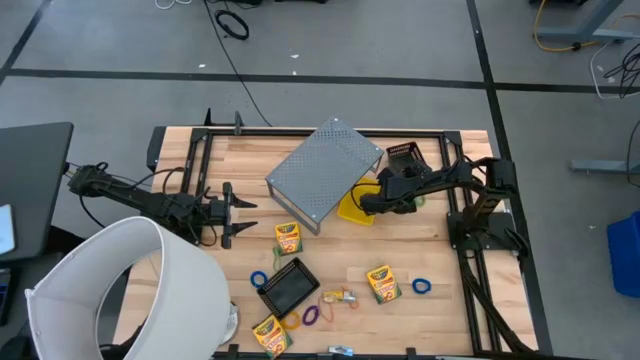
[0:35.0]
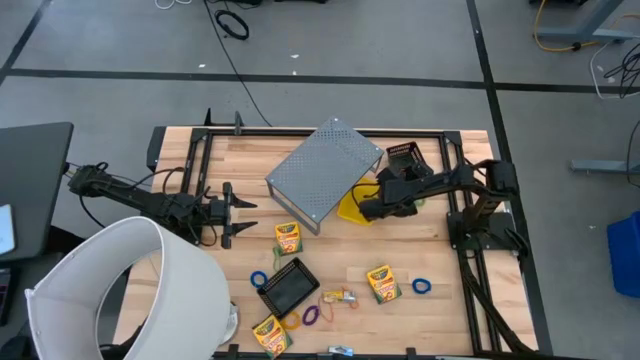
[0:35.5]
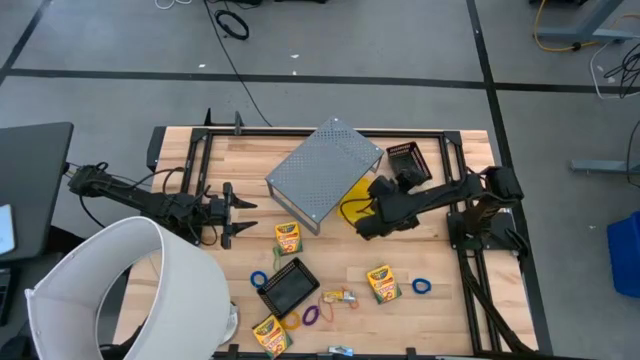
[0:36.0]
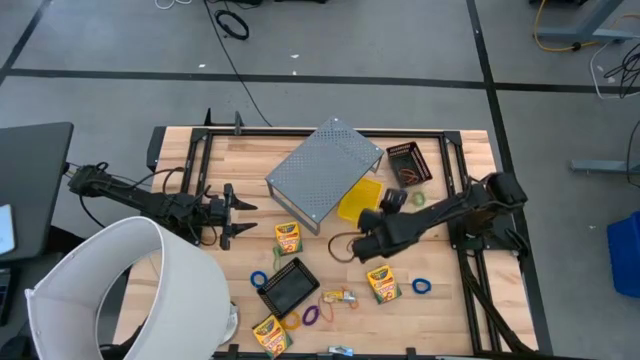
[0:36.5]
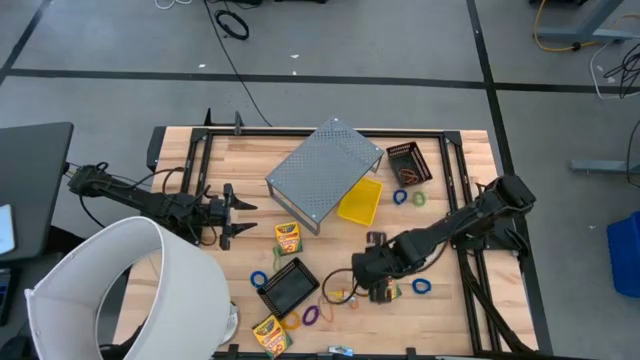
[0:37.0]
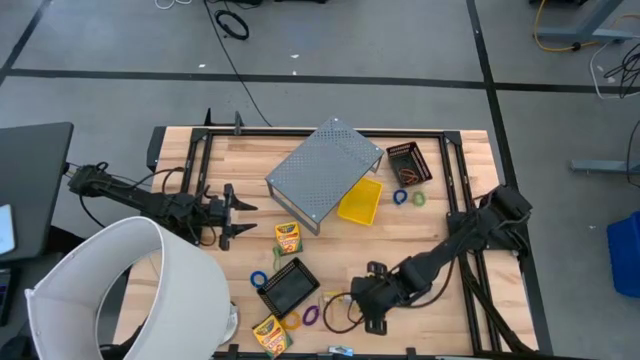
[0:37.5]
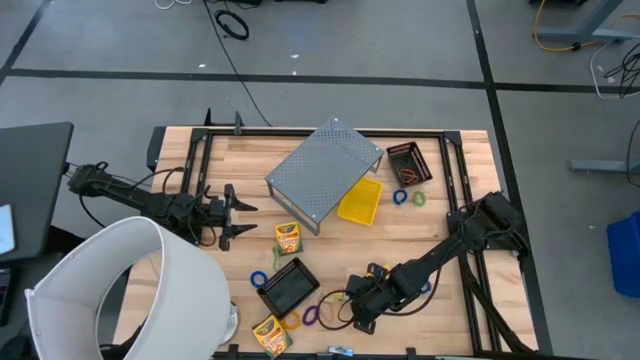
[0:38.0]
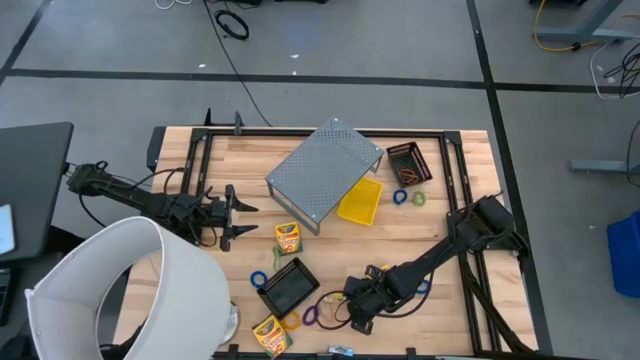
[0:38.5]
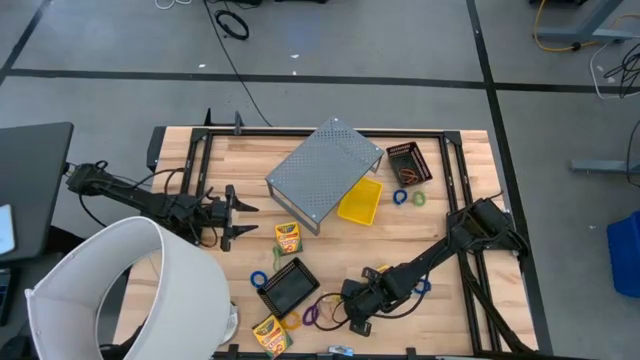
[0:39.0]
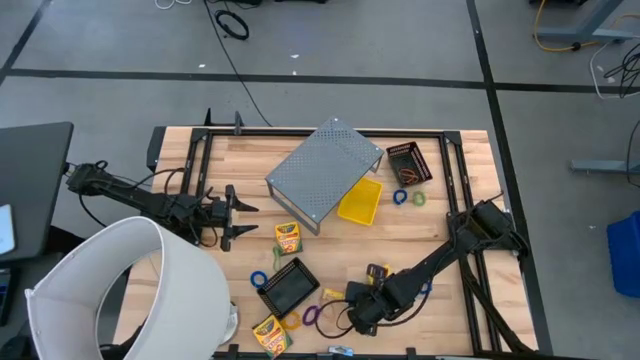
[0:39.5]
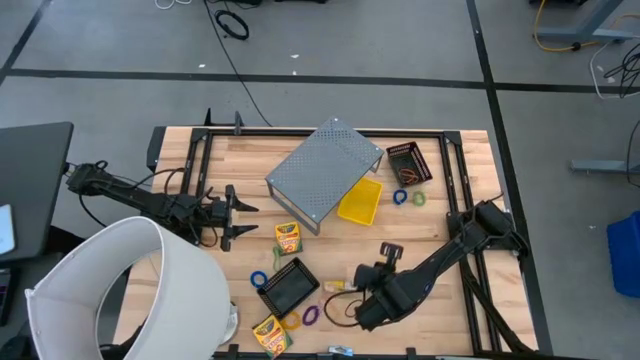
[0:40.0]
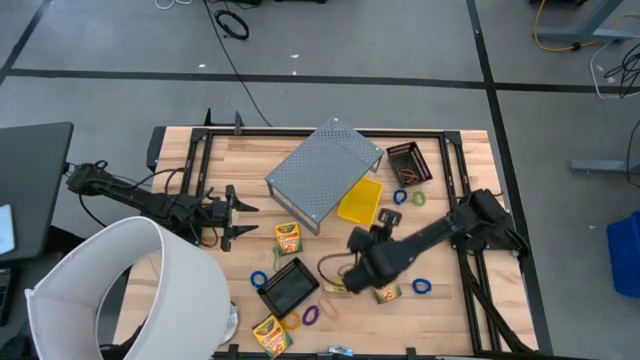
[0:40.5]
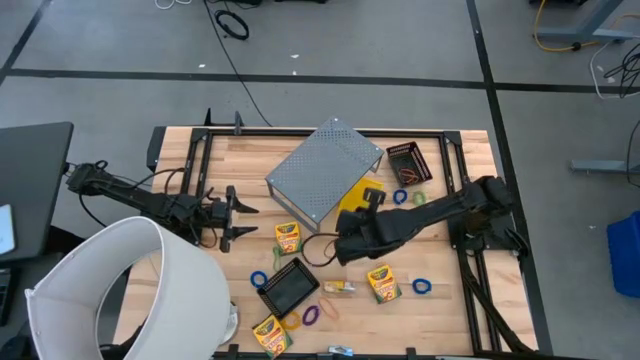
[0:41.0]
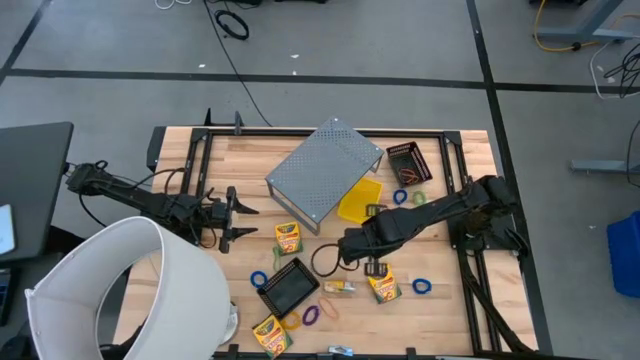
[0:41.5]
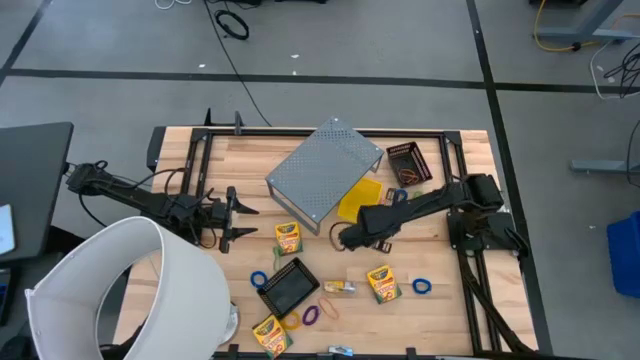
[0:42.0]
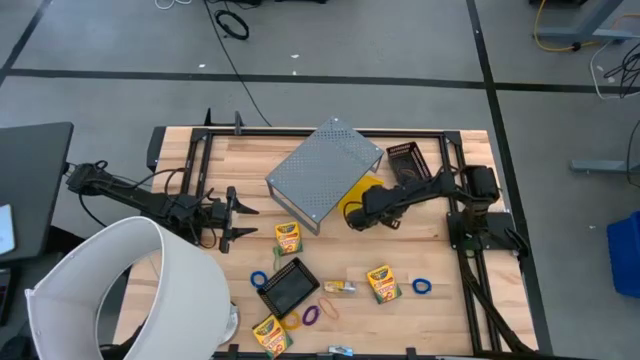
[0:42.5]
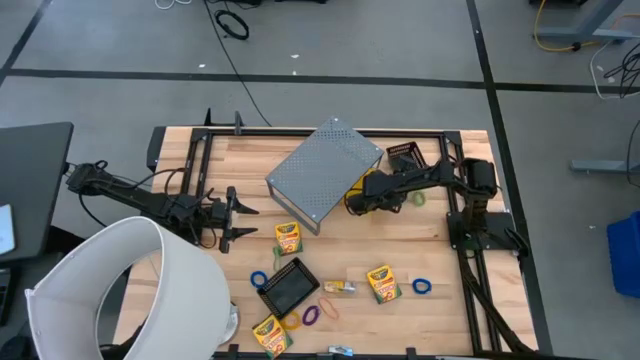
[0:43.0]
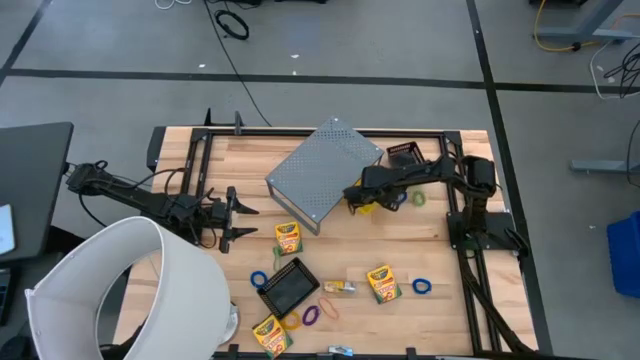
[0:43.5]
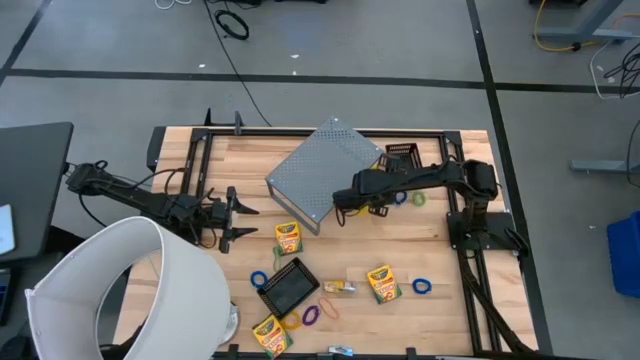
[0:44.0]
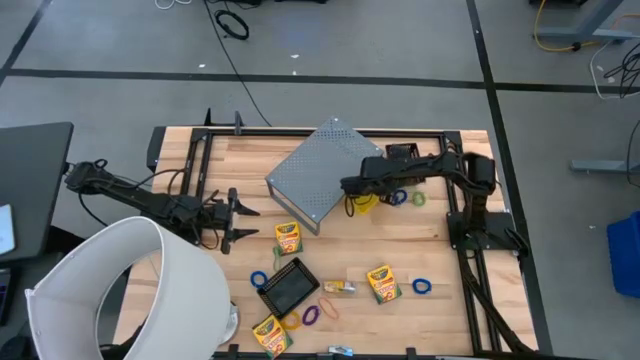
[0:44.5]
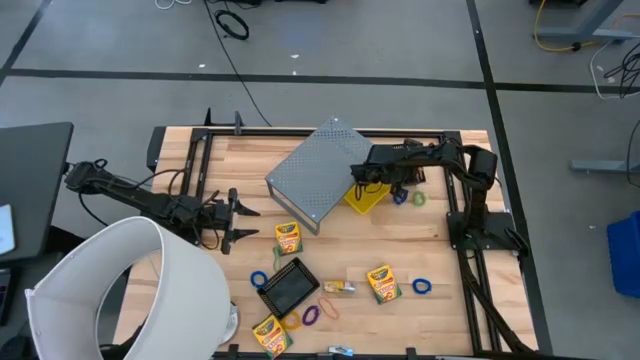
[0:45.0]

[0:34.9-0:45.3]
Task: Pick & Place Office Desk Supplies
Put the orange rubber band into the top black bin

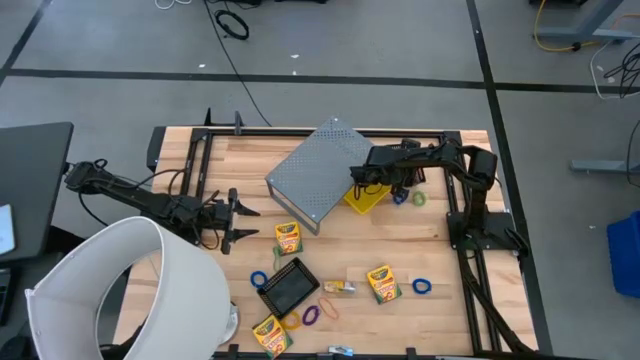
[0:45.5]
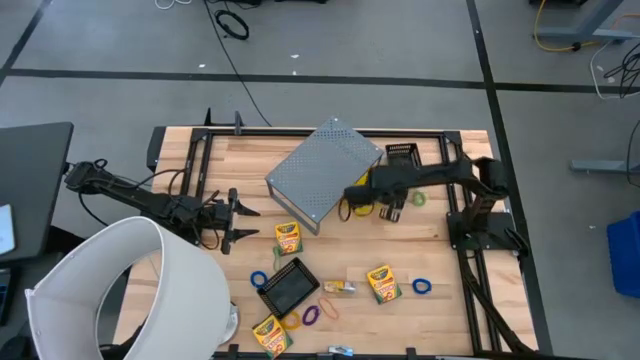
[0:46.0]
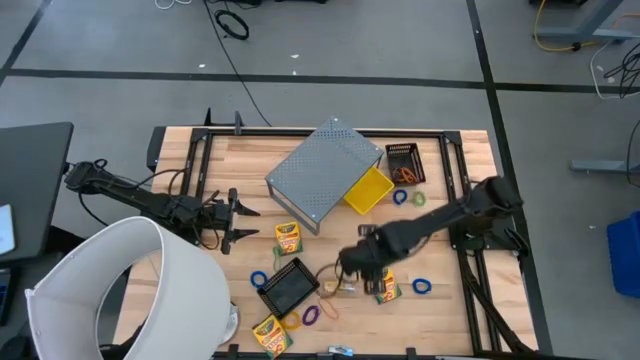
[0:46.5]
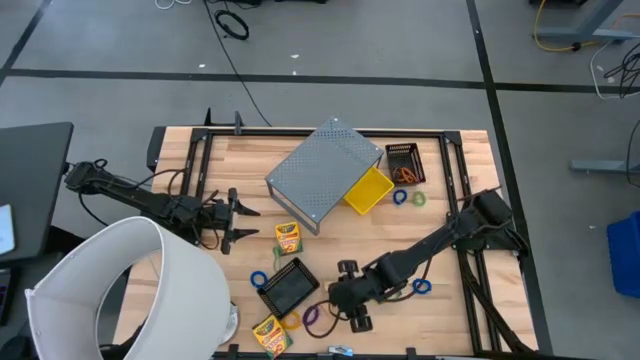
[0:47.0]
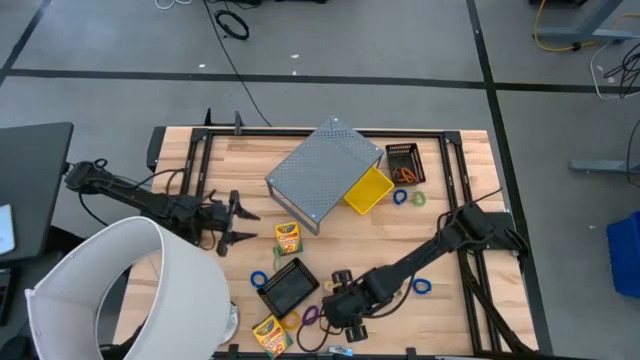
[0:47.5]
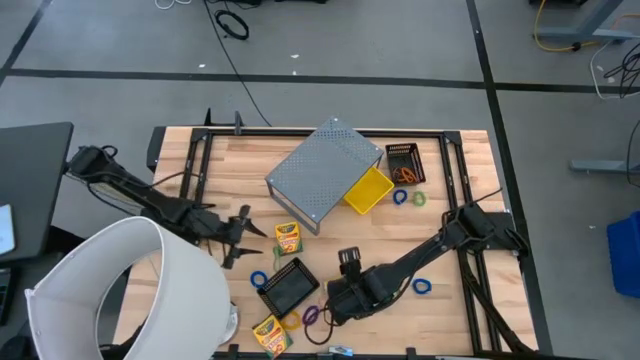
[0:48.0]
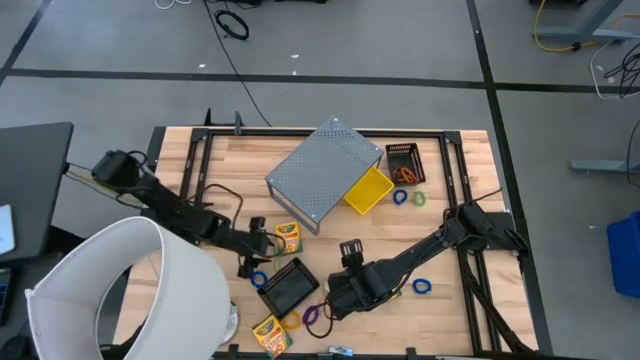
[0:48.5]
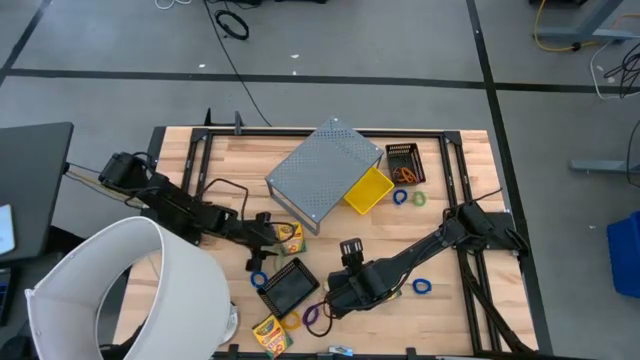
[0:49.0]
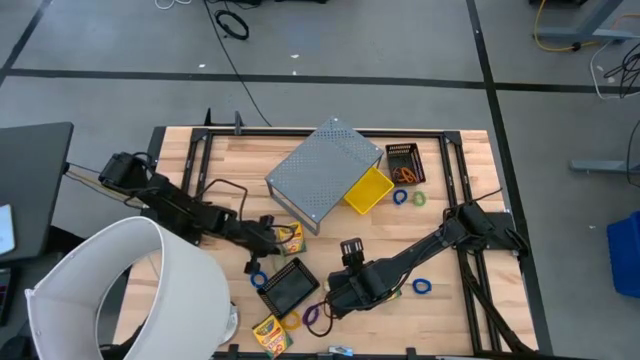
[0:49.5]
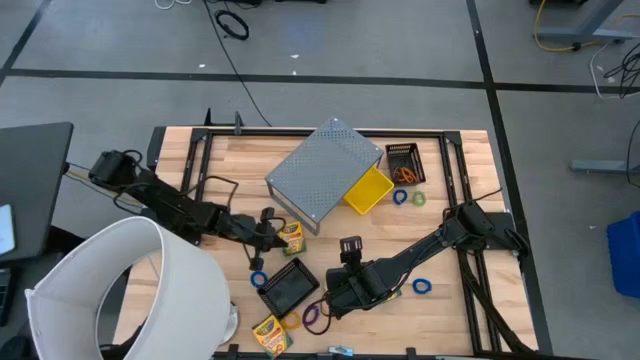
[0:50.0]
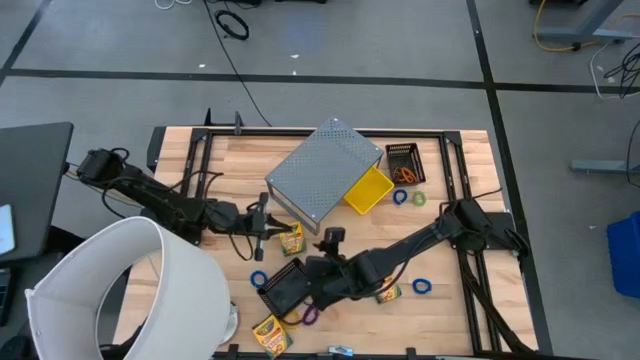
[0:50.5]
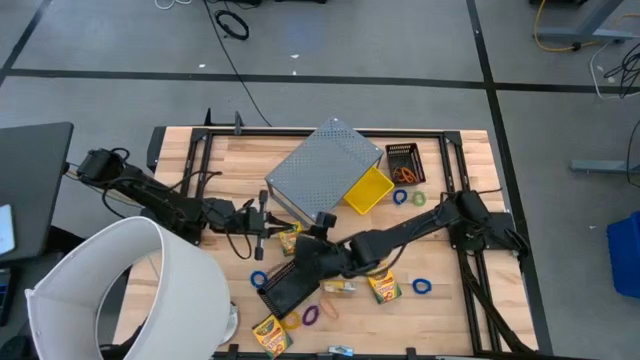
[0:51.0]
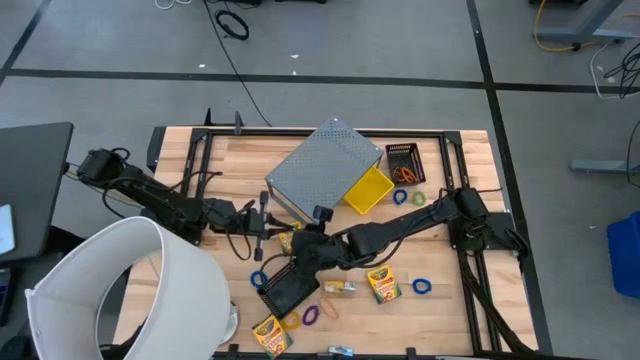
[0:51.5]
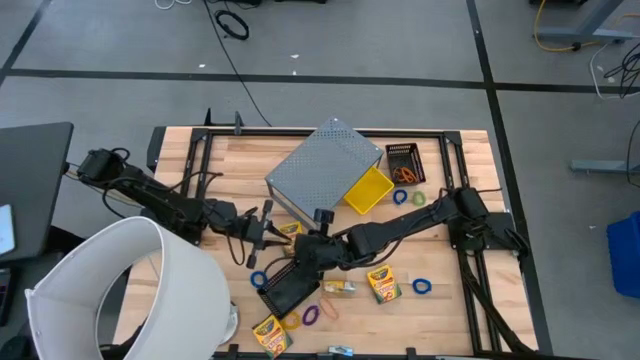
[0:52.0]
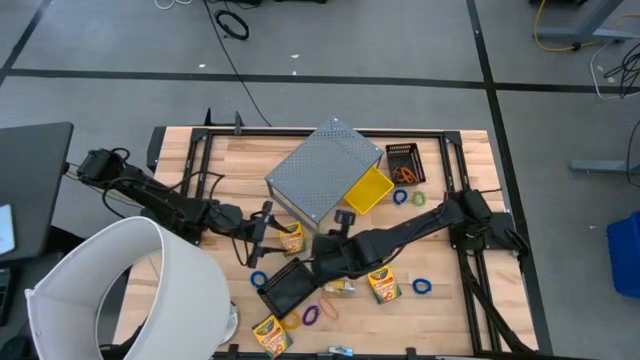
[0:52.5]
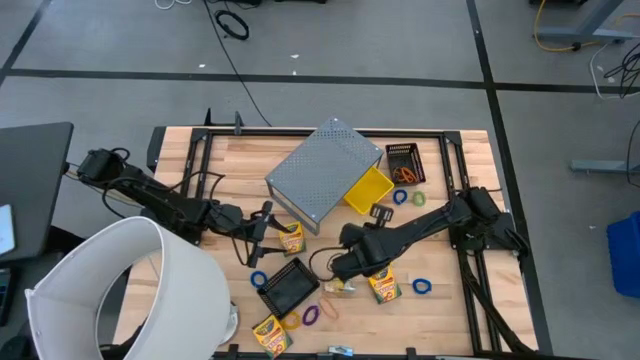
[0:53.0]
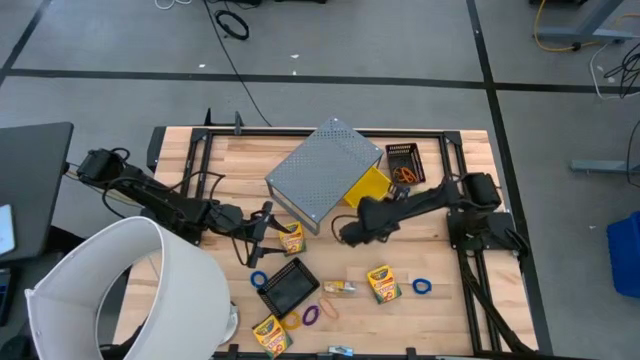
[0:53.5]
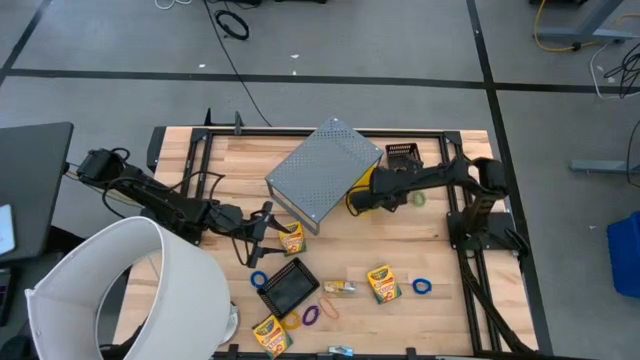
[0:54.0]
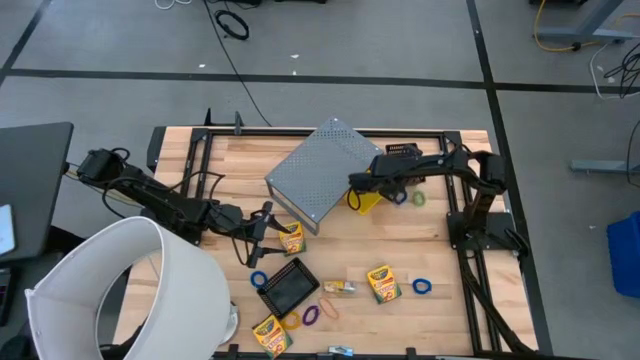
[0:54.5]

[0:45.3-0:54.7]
Put the green rubber band into the top black bin

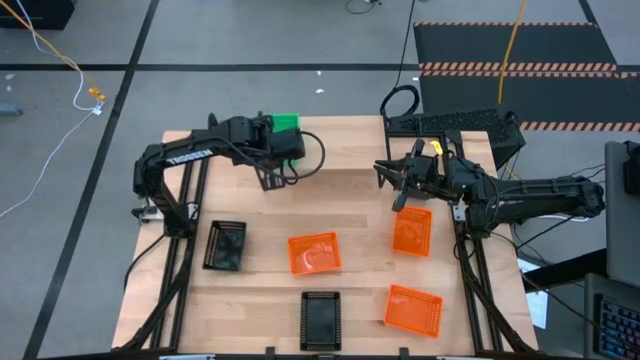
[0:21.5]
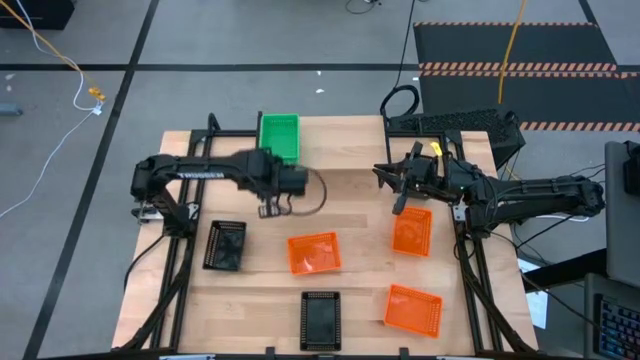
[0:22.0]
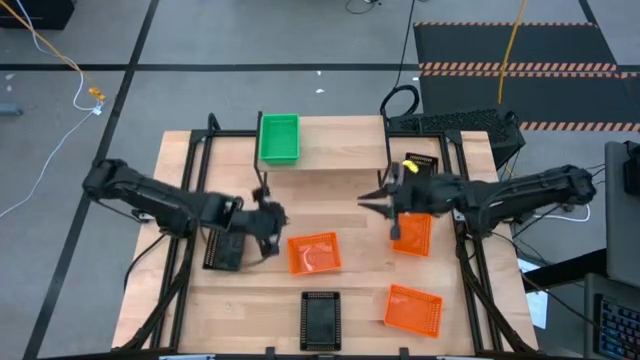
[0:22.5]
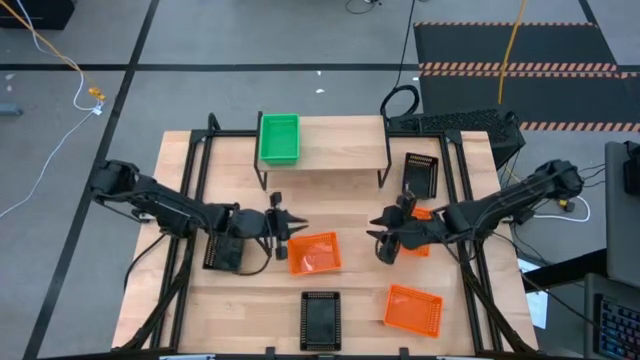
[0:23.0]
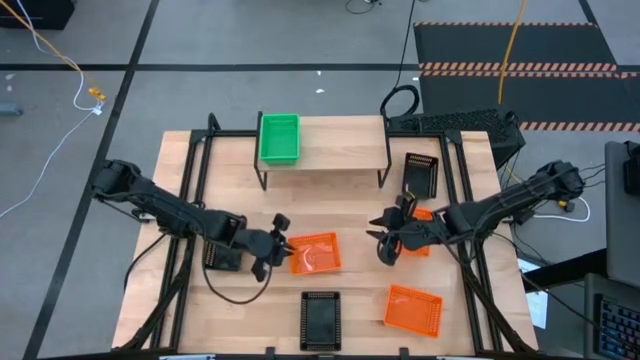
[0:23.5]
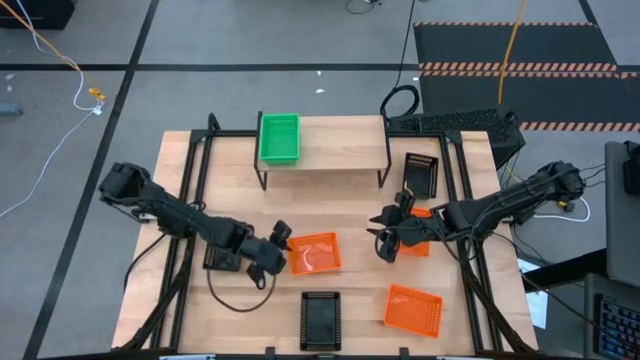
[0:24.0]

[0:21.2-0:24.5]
Task: Stack baskets on shelf by color
Stack the top left orange bin on the shelf
